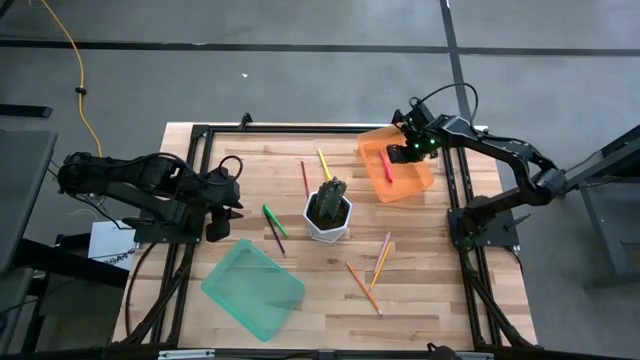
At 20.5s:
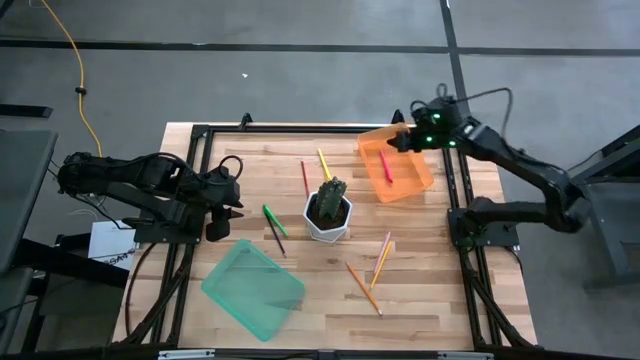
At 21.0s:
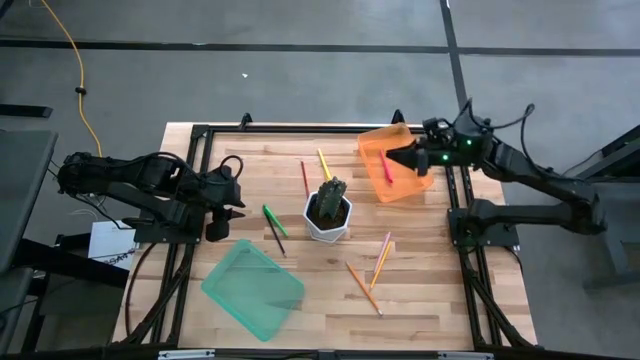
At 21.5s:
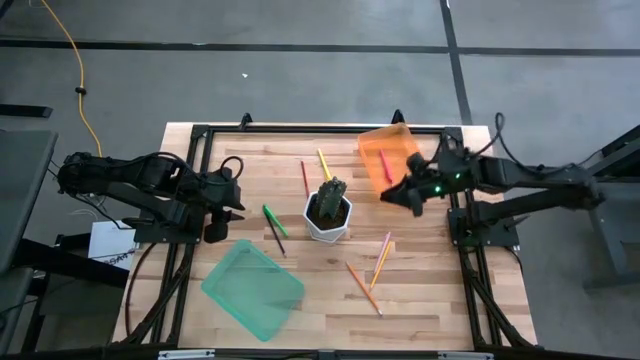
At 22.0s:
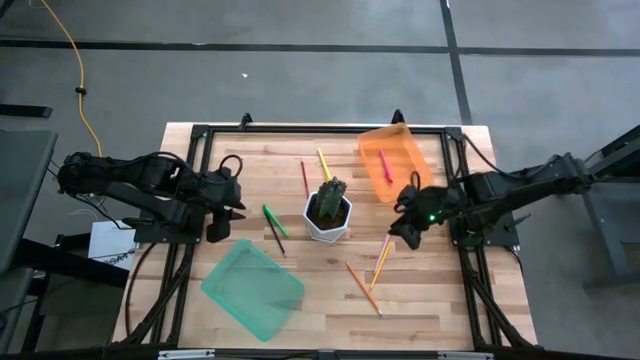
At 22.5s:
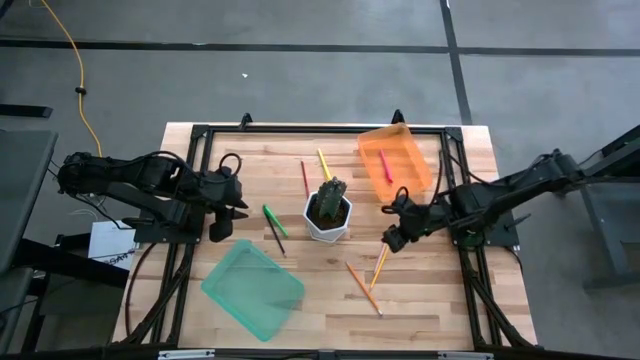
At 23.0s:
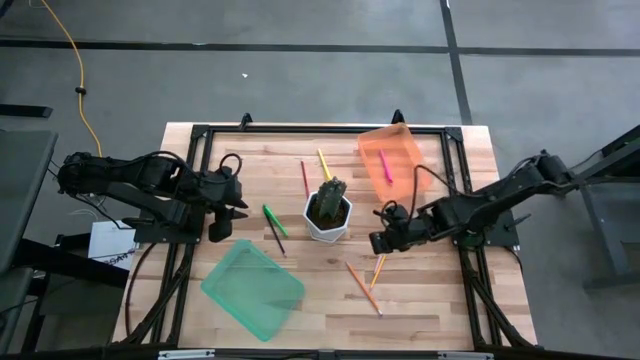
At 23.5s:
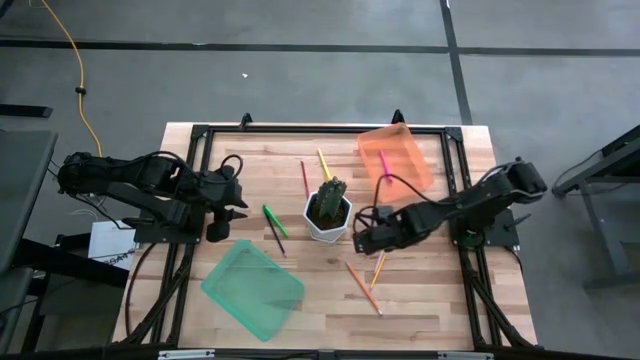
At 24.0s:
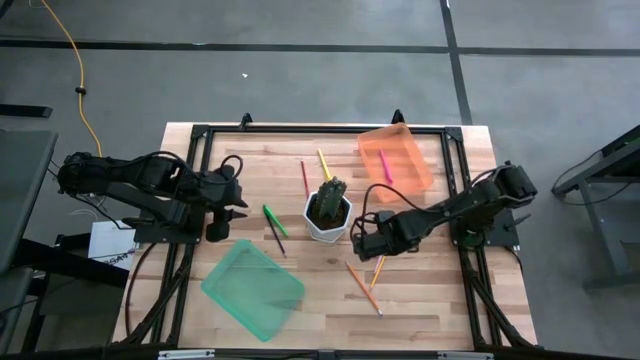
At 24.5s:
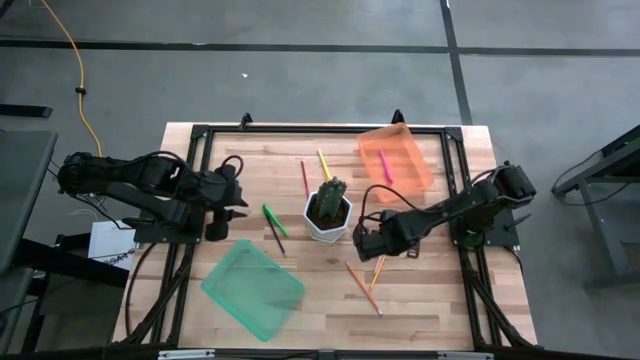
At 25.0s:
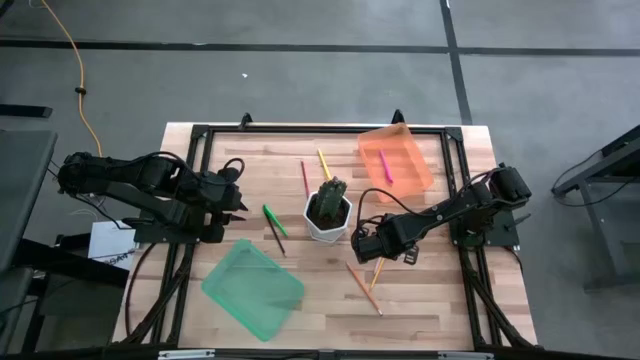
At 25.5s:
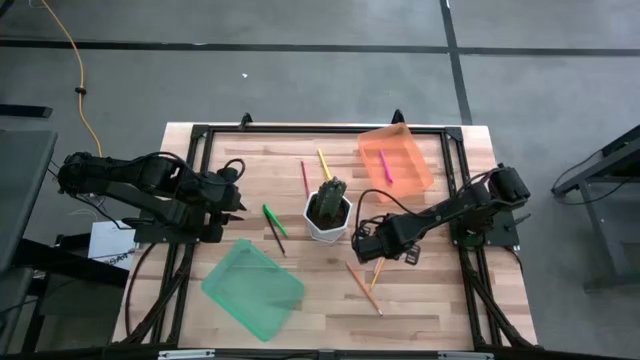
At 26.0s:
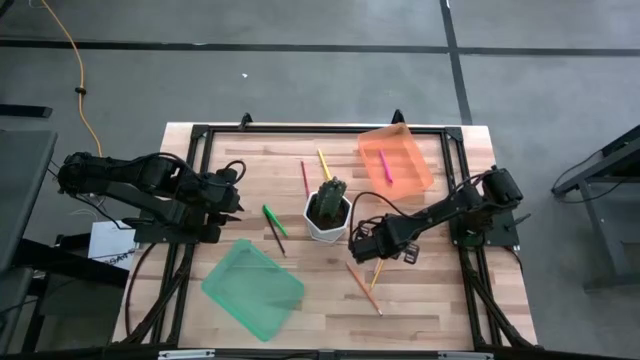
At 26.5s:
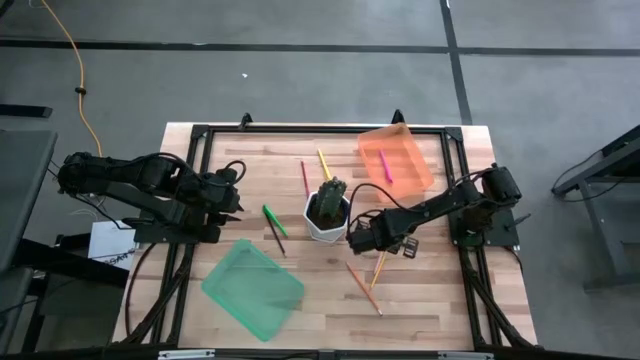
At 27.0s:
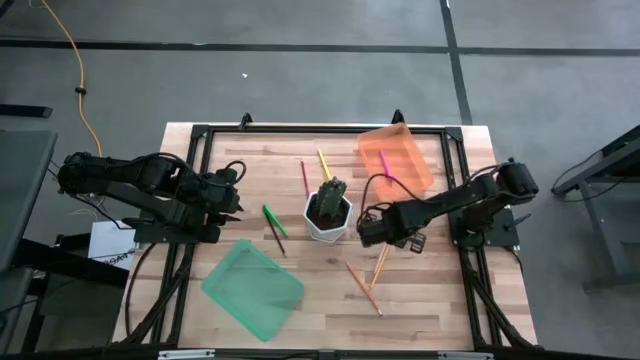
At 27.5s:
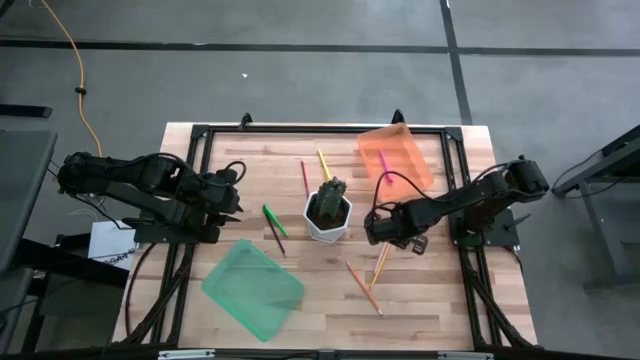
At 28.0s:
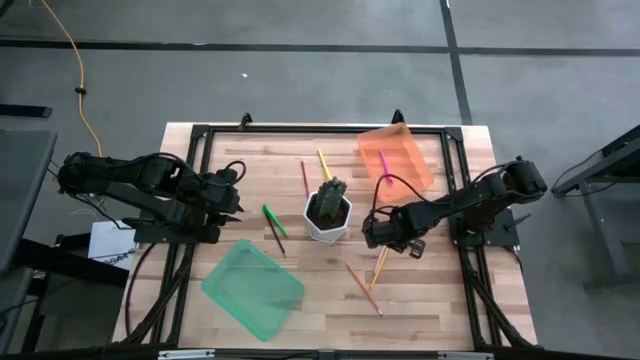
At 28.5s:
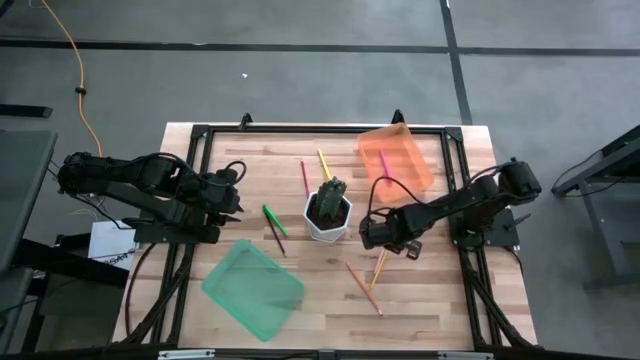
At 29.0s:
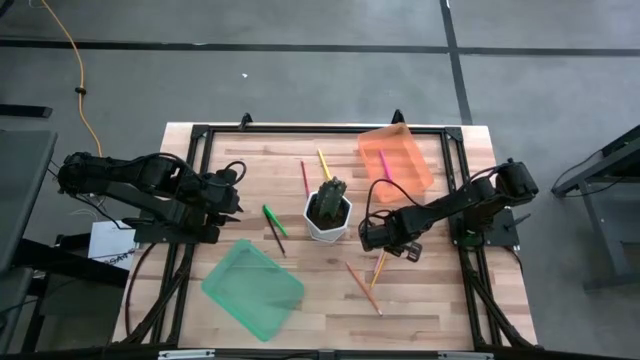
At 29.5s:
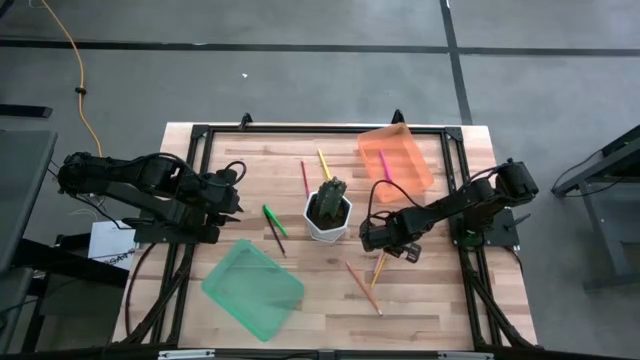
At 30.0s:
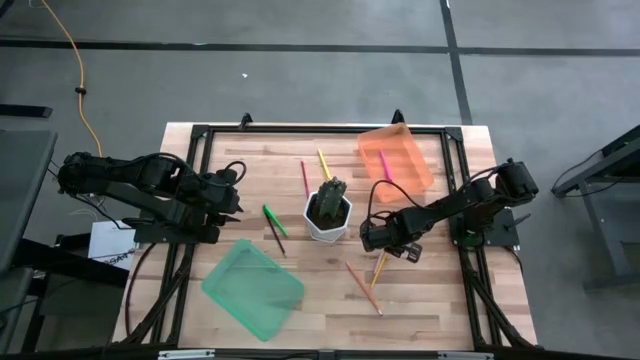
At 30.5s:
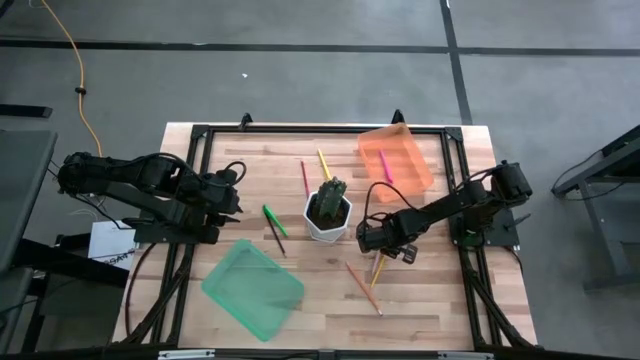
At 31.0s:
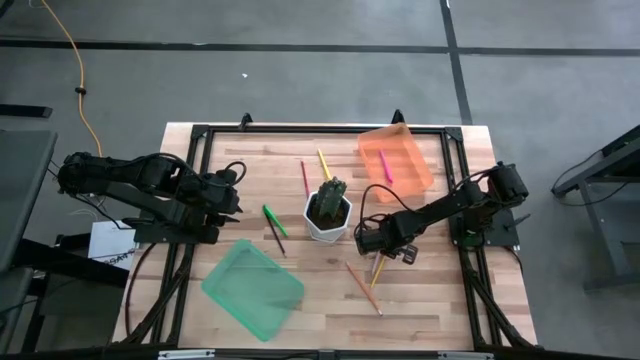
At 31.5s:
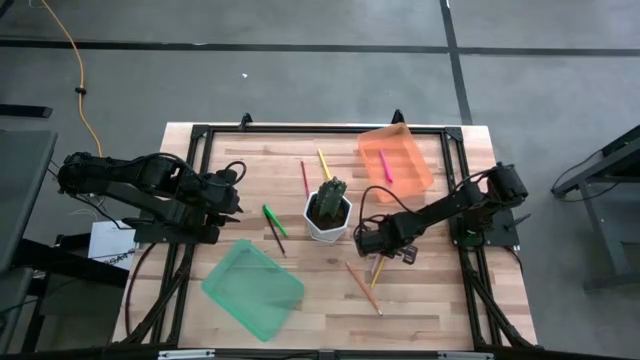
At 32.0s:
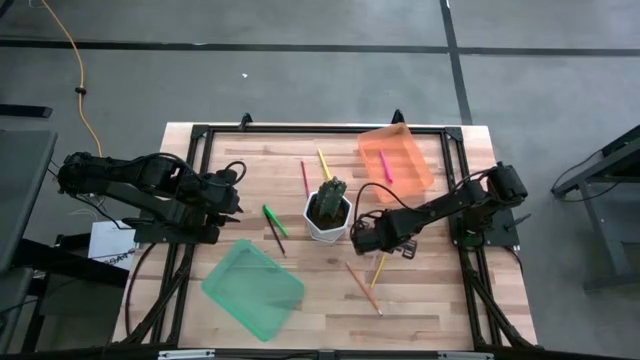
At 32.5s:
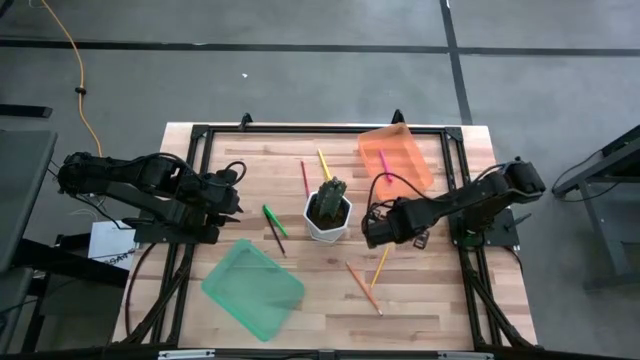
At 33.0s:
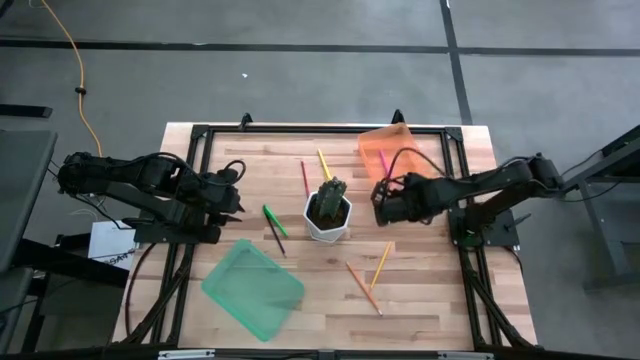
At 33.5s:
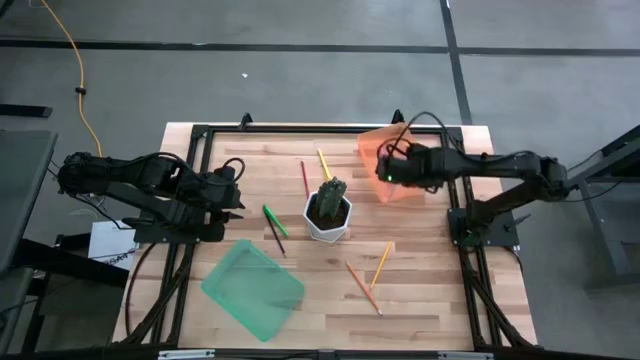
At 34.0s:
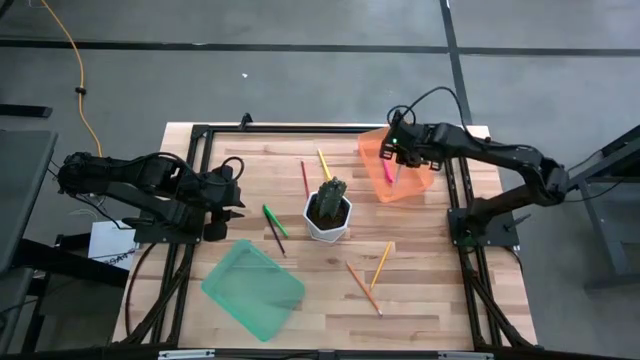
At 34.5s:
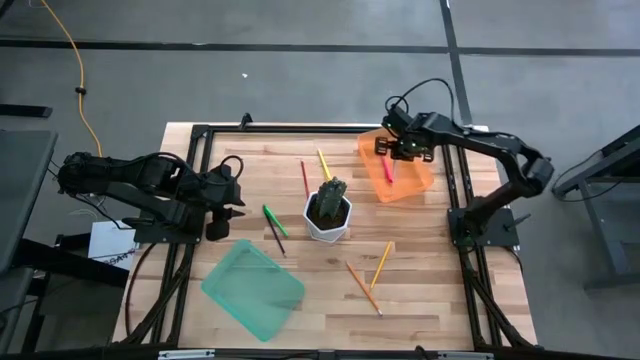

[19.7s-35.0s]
Task: Sort pens & pencils
Put the purple pen into the orange bin

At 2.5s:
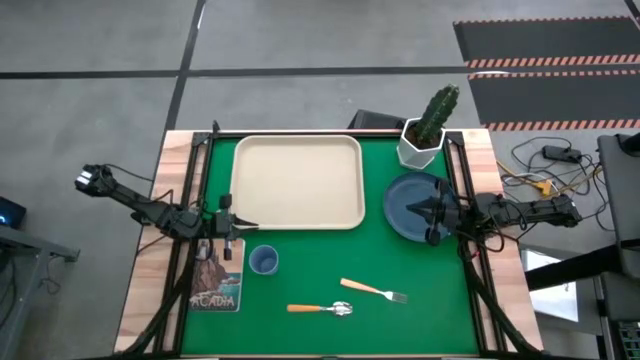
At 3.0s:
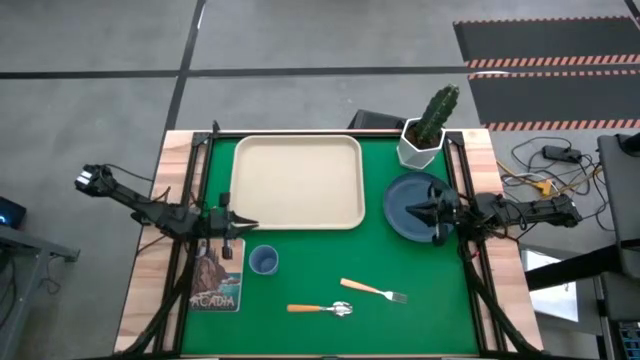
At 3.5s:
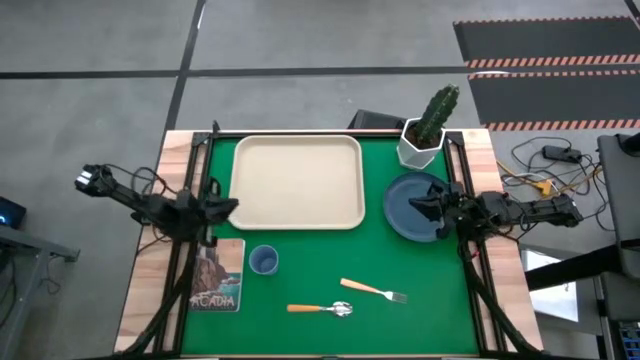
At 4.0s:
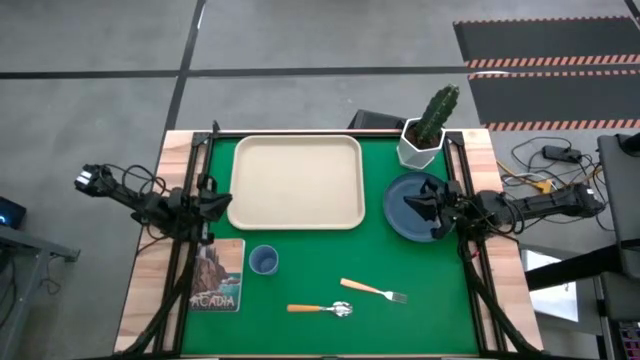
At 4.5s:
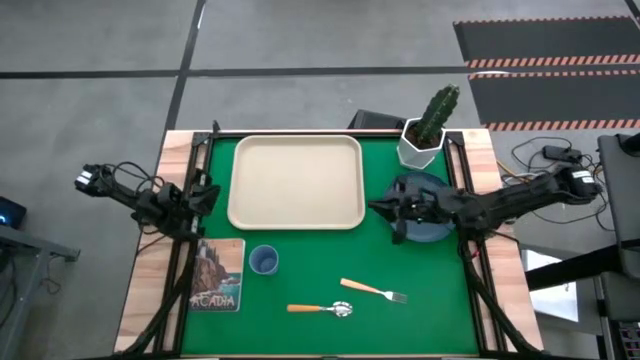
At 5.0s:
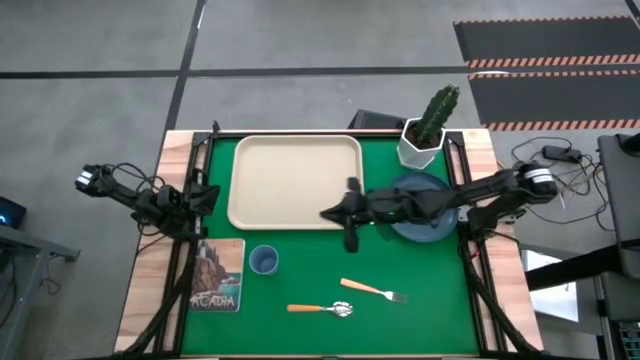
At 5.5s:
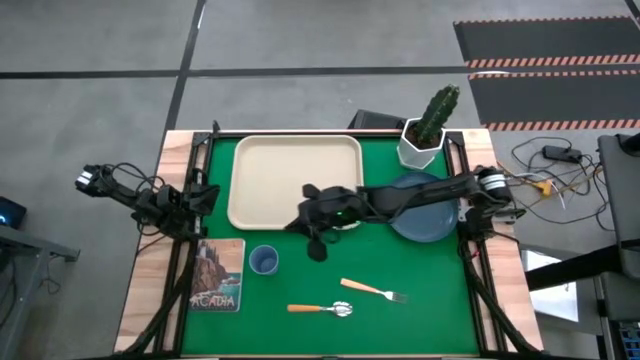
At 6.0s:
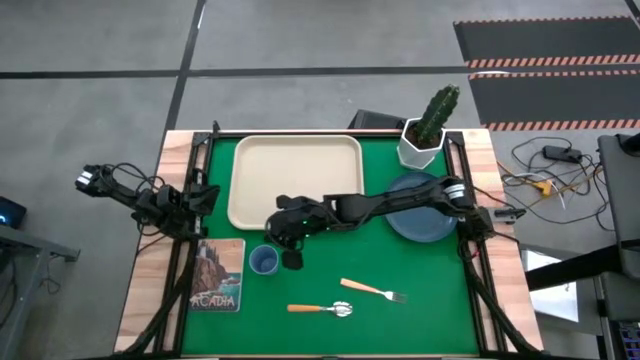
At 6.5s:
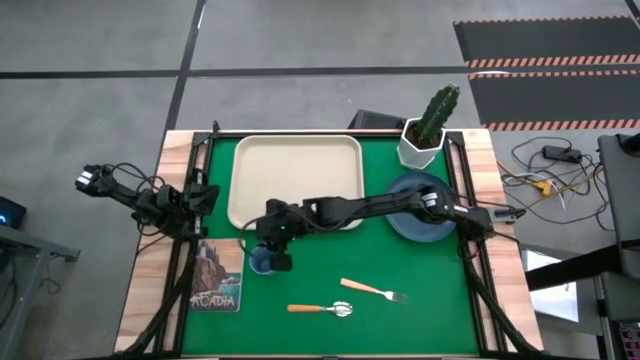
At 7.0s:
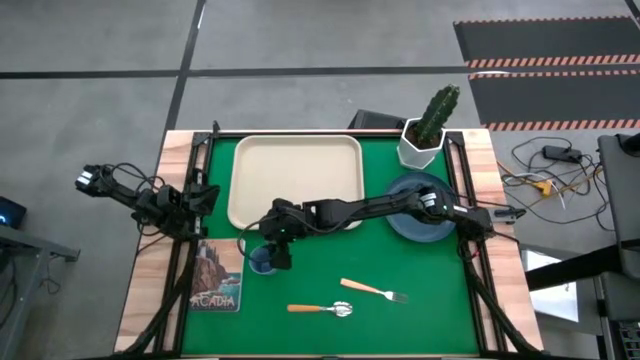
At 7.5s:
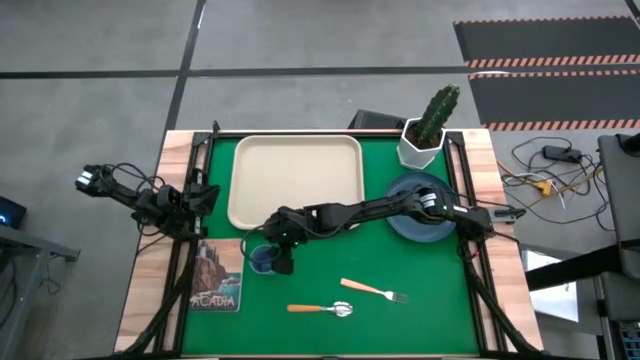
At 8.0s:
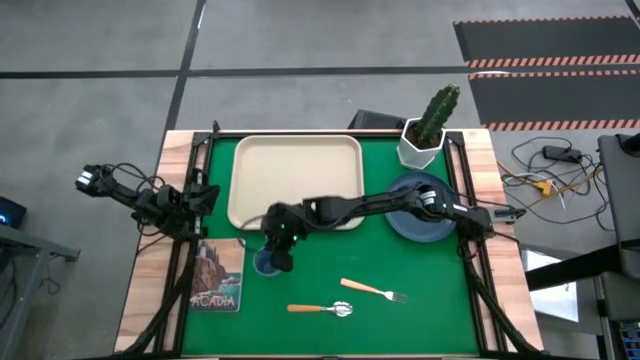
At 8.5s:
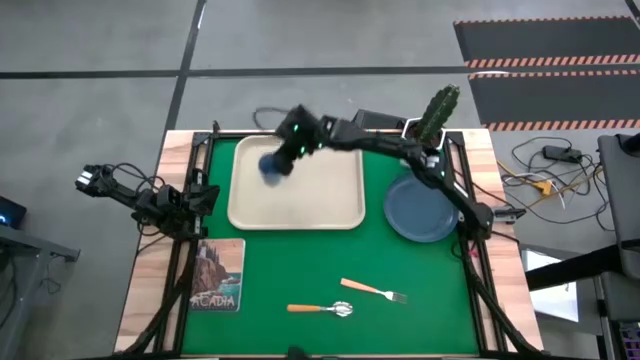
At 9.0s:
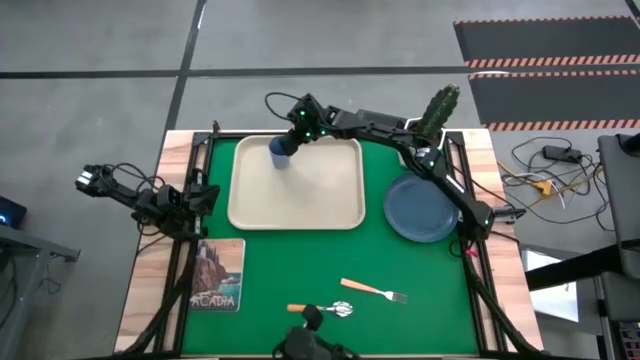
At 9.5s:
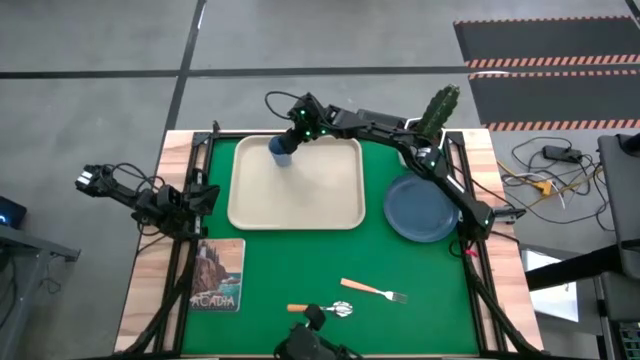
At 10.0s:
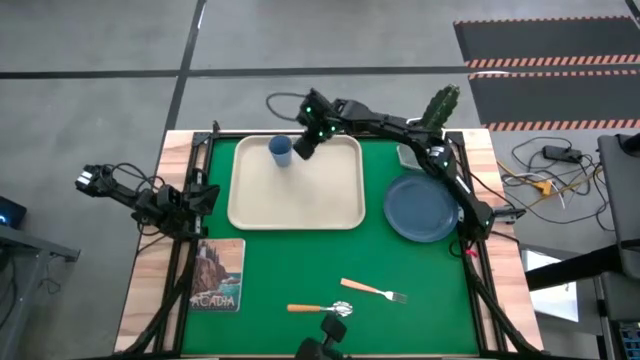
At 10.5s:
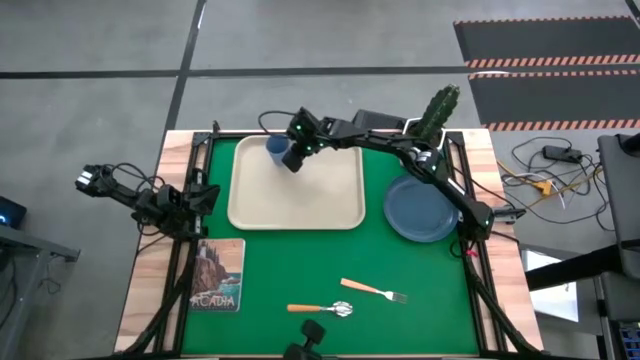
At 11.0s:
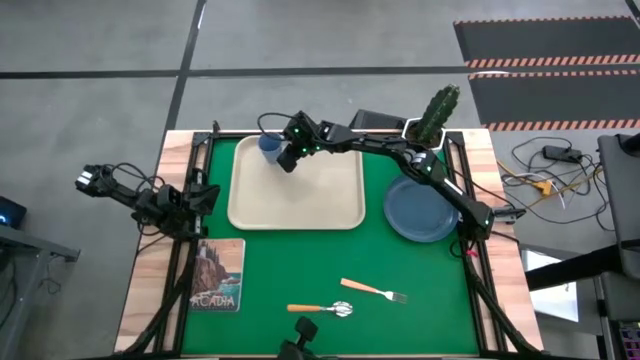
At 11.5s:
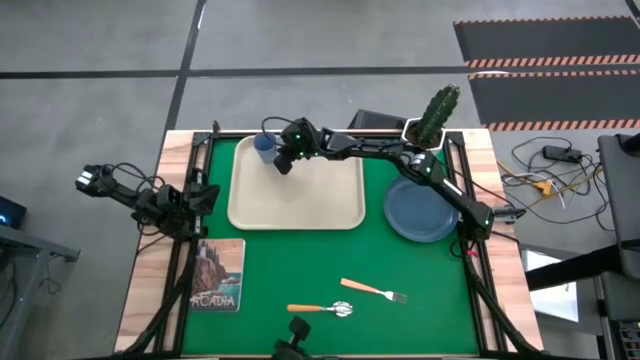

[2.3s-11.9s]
Task: Pick and place plate/cup/fork/spoon on tray
Put the blue cup on the top left of the white tray
